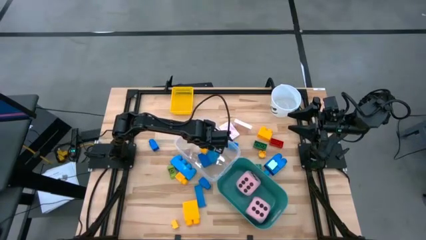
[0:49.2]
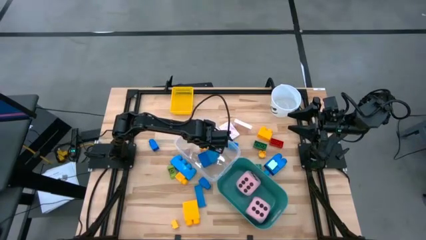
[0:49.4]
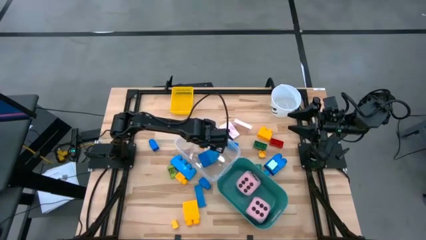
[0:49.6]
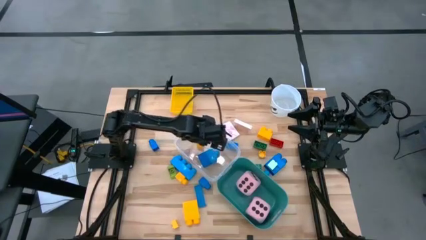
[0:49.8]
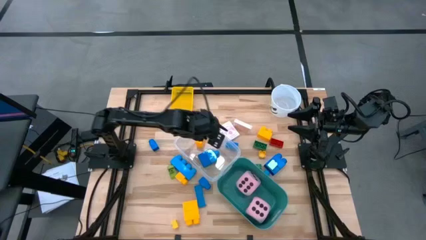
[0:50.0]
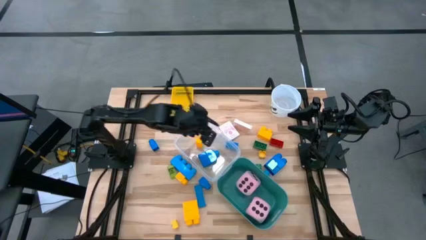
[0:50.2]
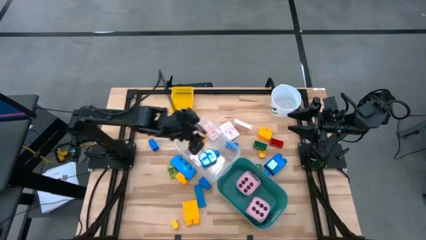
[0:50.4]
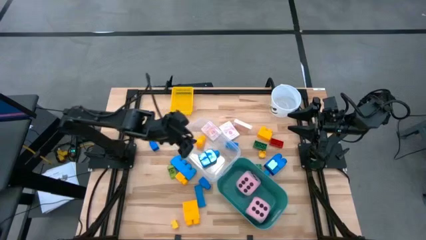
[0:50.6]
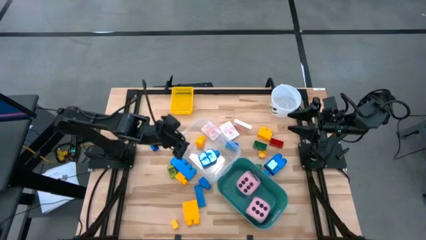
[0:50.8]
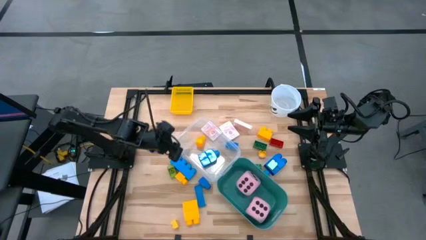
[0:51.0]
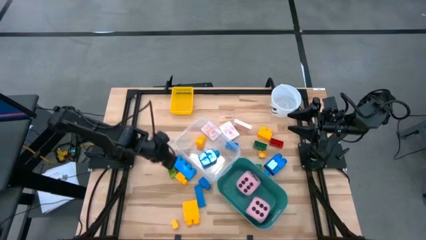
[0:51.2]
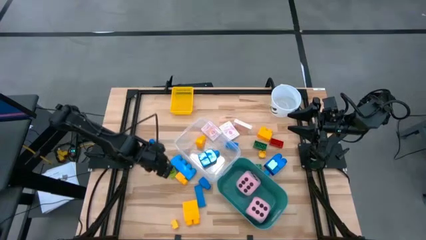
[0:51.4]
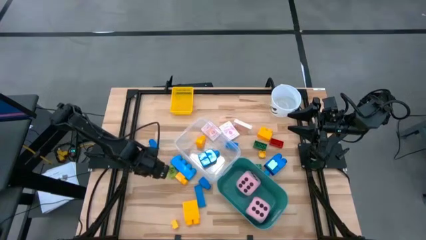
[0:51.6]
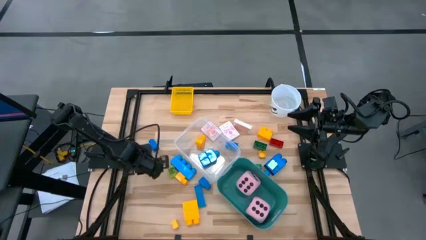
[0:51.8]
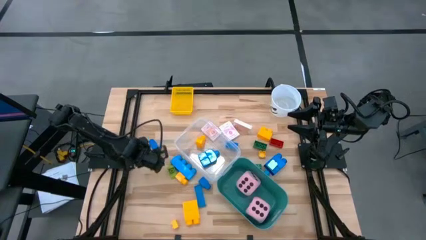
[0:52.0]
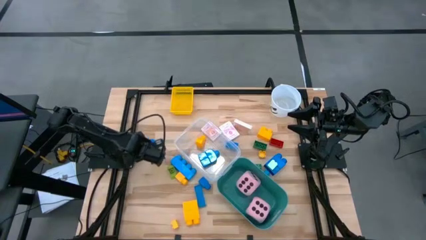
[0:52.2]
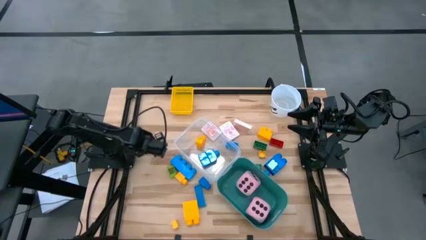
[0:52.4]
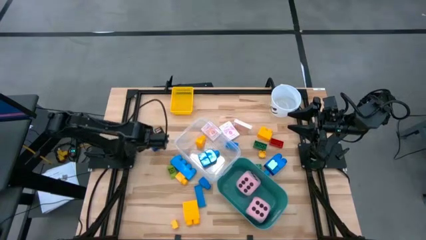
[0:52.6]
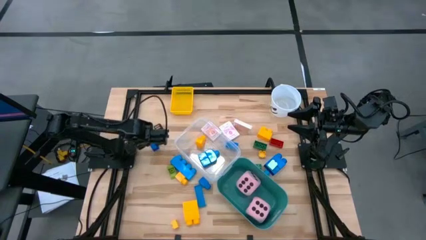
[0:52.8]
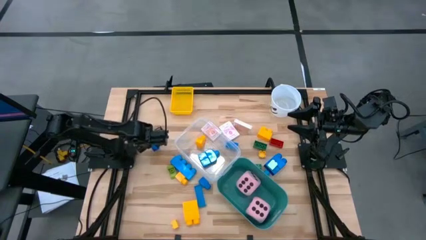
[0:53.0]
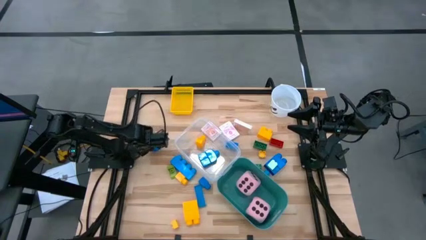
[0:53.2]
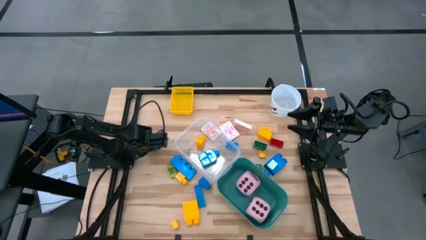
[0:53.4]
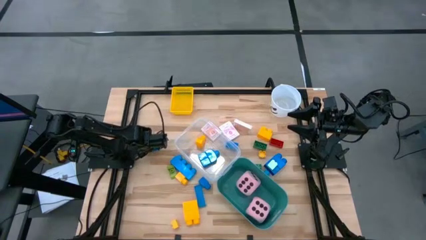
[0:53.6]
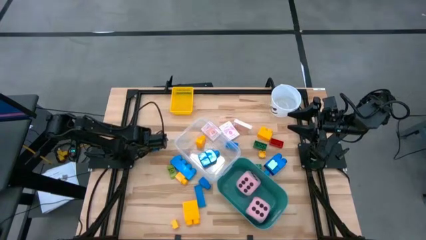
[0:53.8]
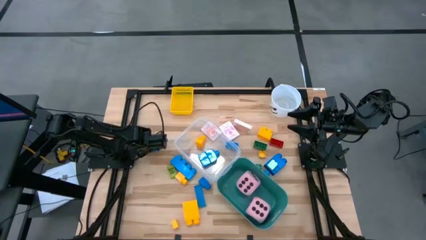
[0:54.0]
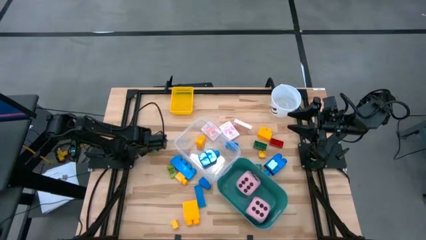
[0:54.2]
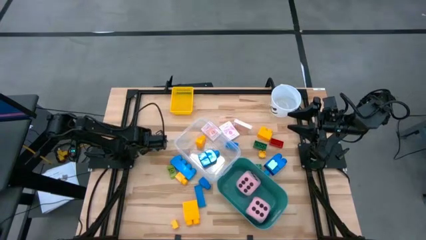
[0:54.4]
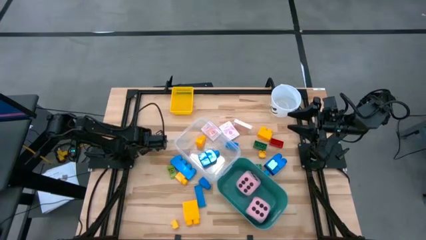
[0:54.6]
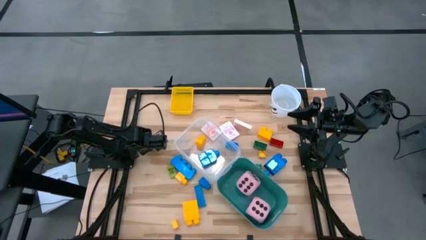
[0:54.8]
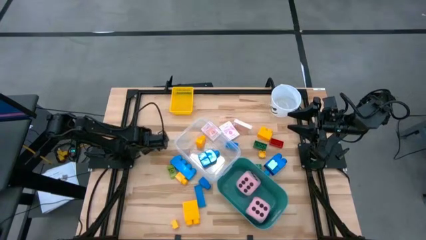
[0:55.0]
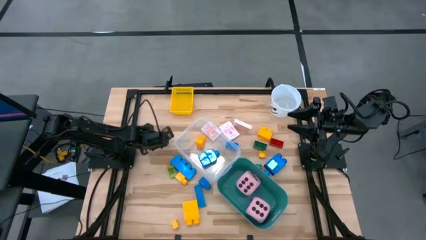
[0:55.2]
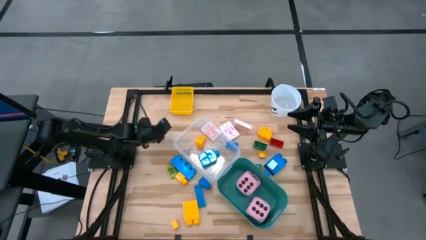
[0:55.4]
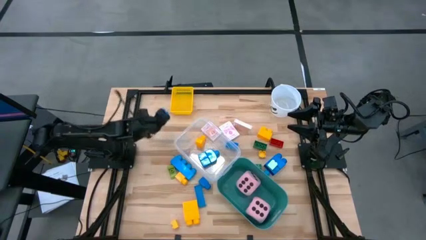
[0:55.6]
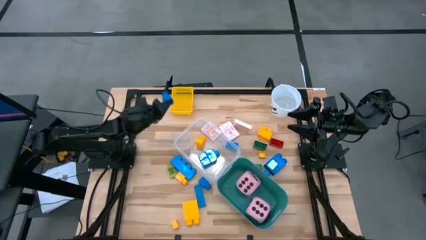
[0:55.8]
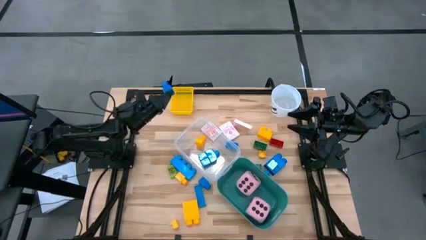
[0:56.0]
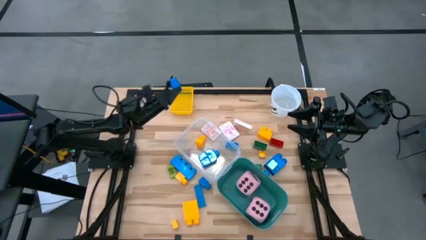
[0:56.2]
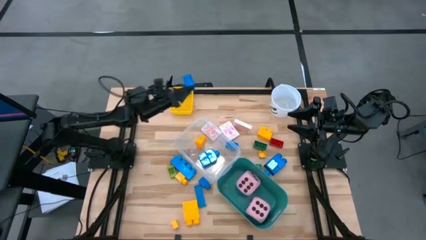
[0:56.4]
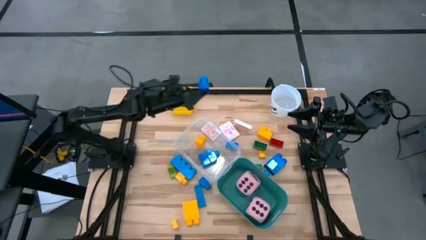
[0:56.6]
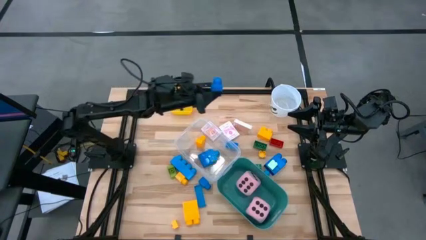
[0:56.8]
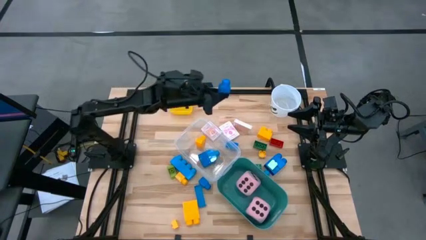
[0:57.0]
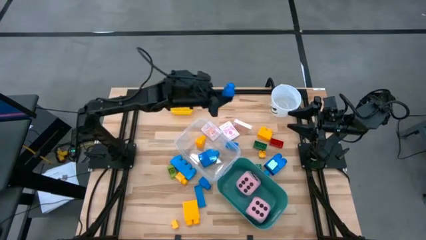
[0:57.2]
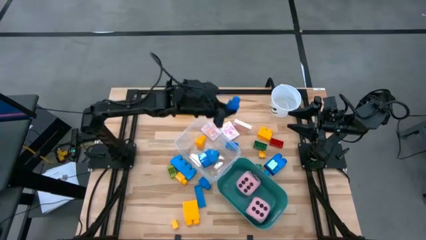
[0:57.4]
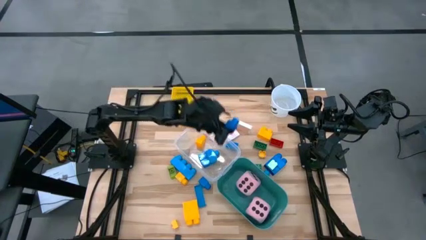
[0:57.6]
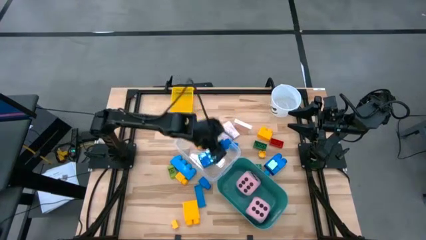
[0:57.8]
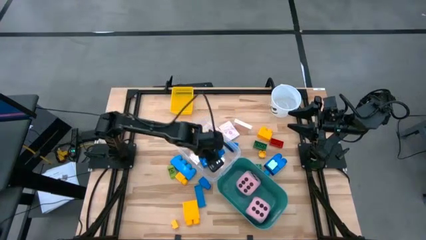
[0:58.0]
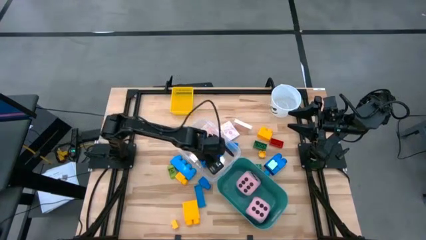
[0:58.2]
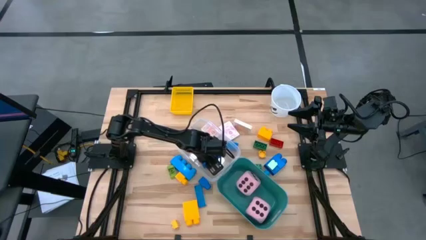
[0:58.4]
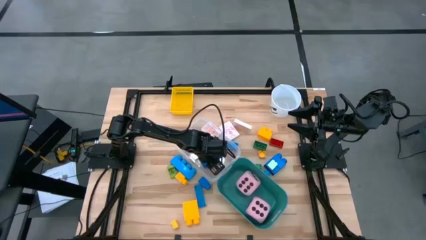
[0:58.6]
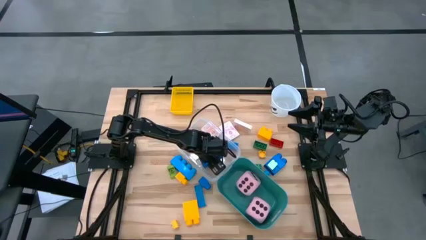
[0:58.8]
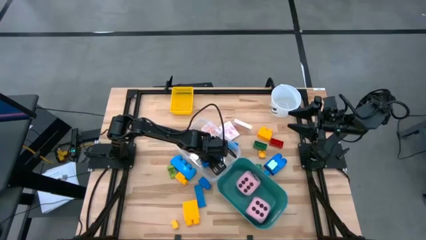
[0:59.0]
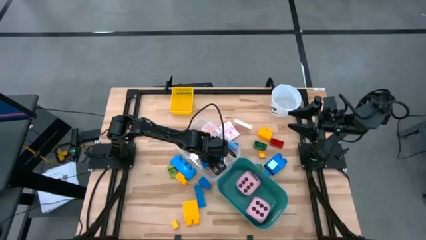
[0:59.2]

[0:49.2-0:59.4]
Task: Pick & Place Toys
Put the blue game piece into the transparent bin
